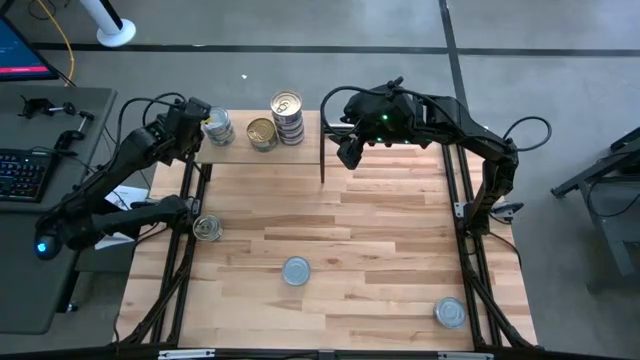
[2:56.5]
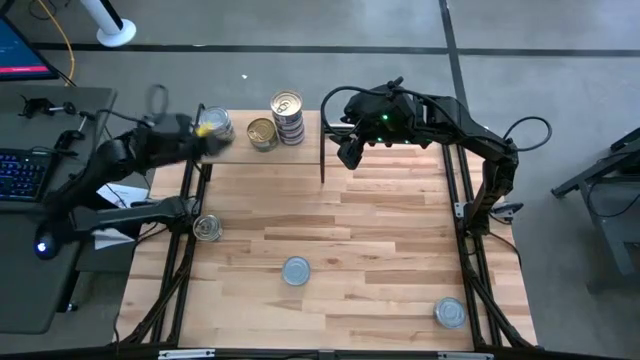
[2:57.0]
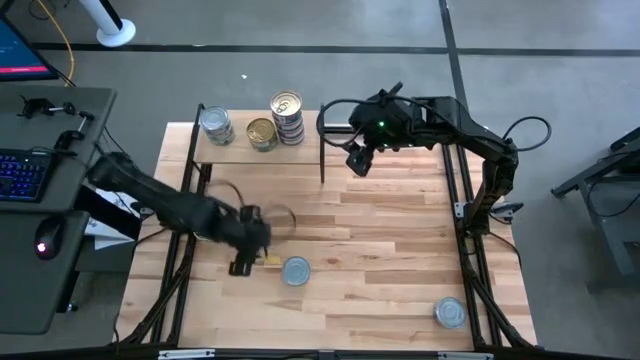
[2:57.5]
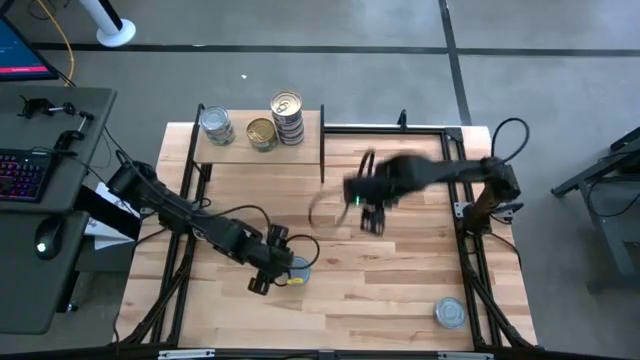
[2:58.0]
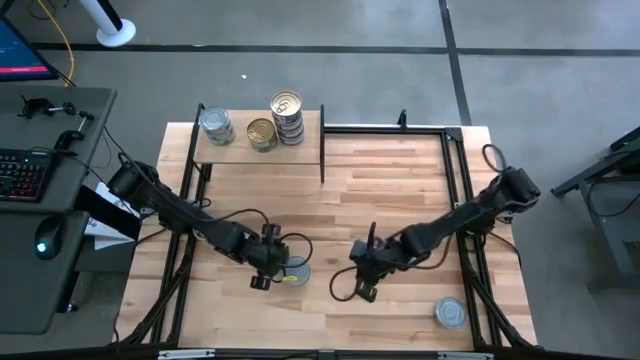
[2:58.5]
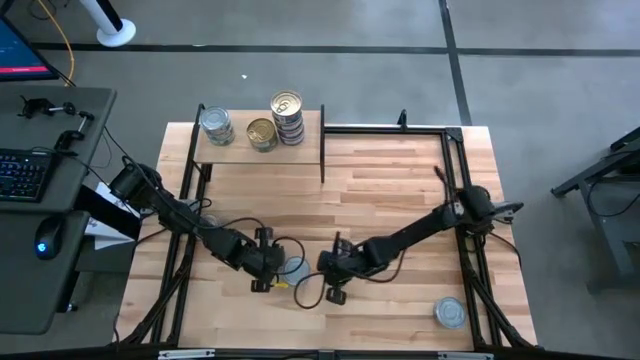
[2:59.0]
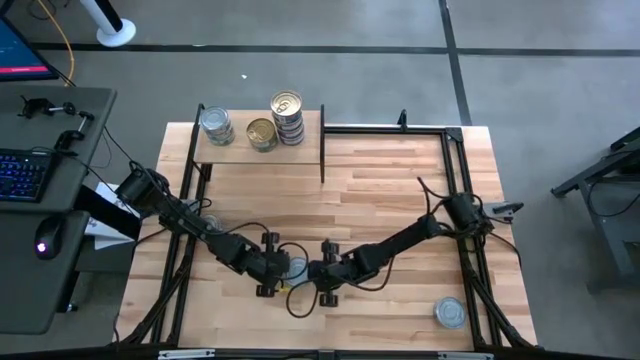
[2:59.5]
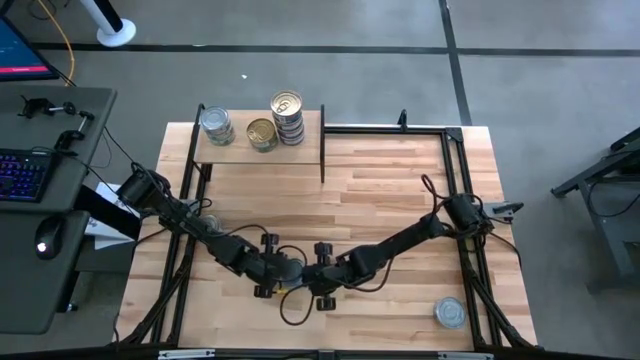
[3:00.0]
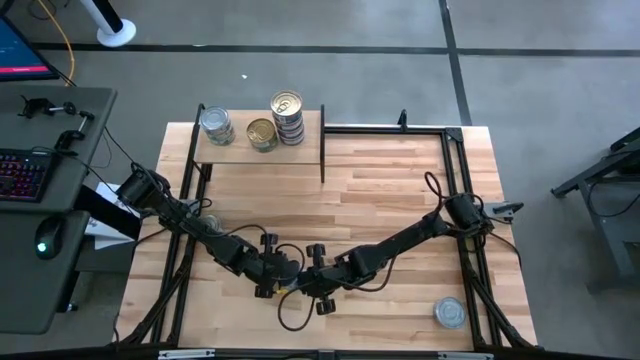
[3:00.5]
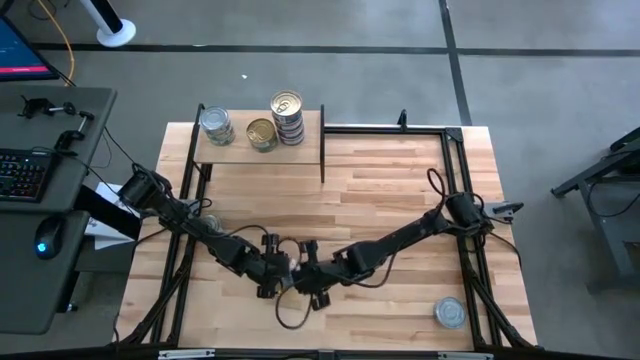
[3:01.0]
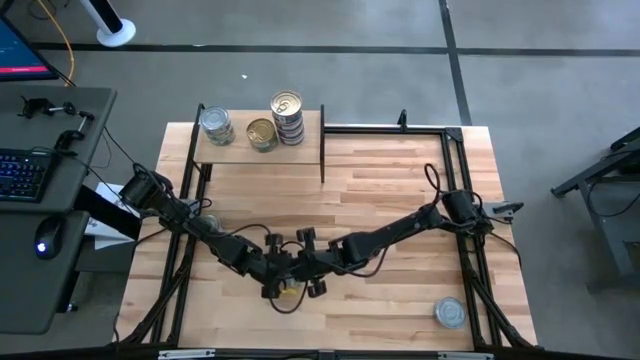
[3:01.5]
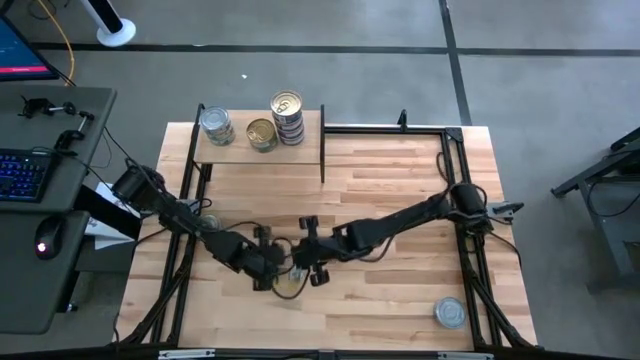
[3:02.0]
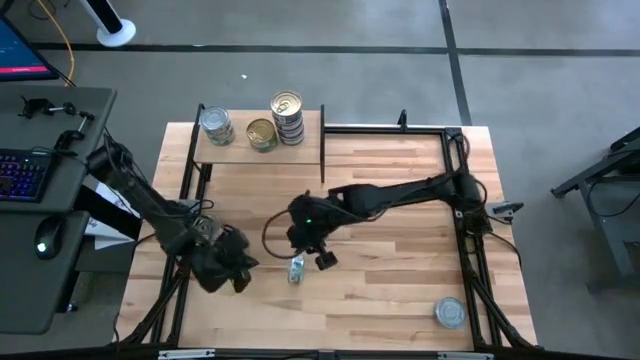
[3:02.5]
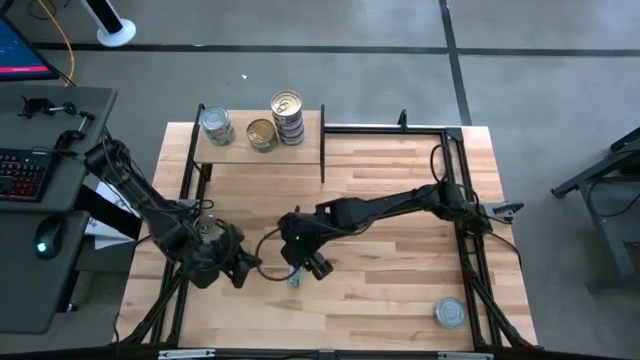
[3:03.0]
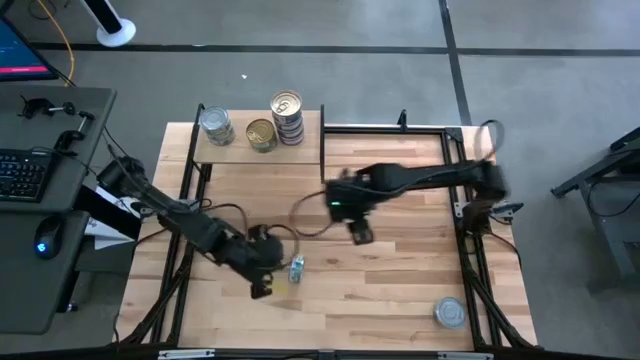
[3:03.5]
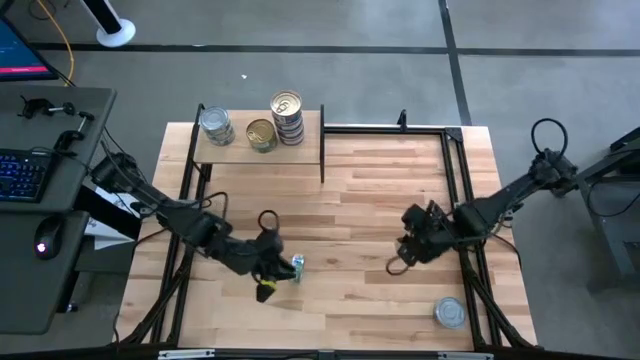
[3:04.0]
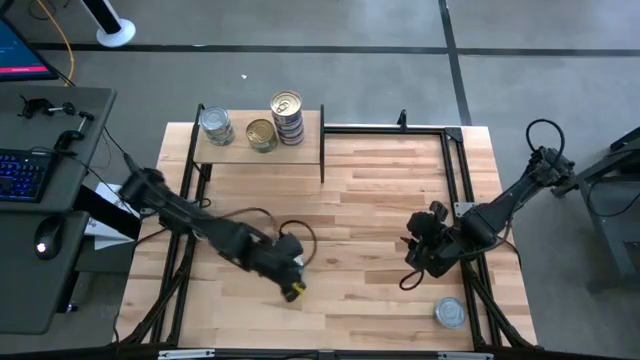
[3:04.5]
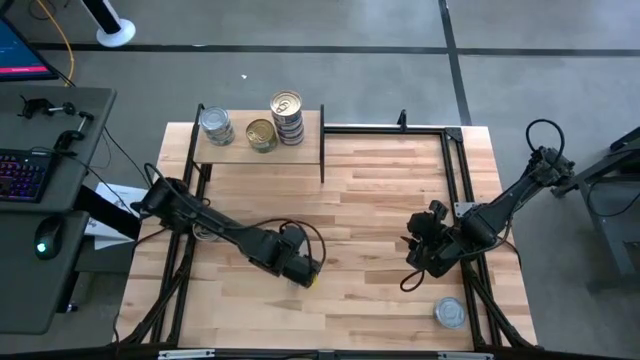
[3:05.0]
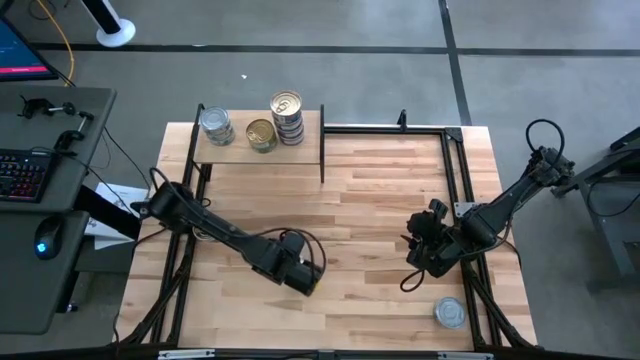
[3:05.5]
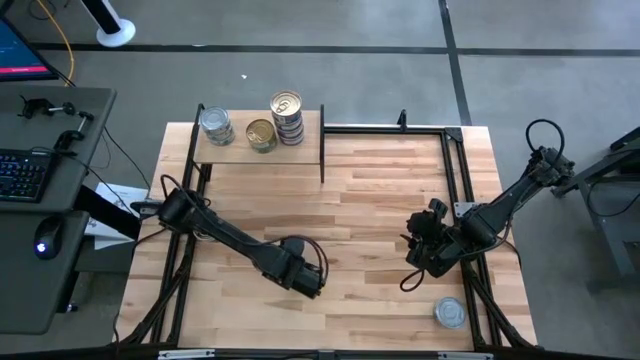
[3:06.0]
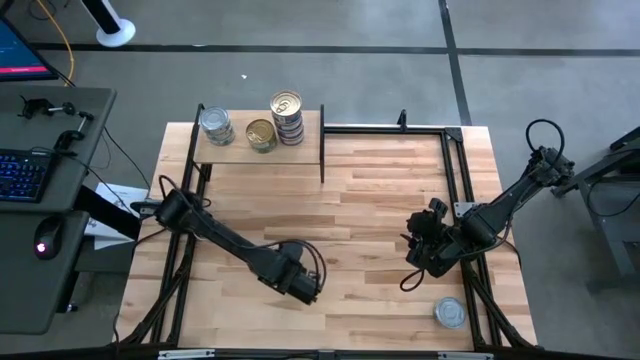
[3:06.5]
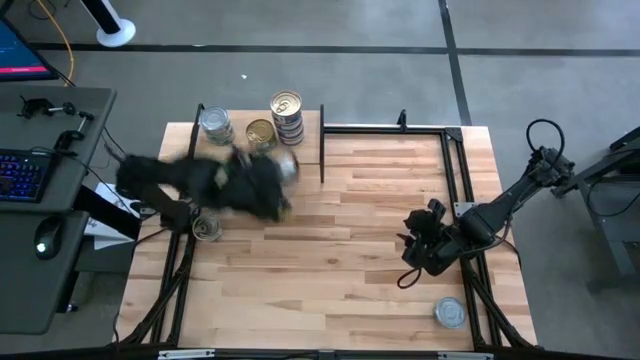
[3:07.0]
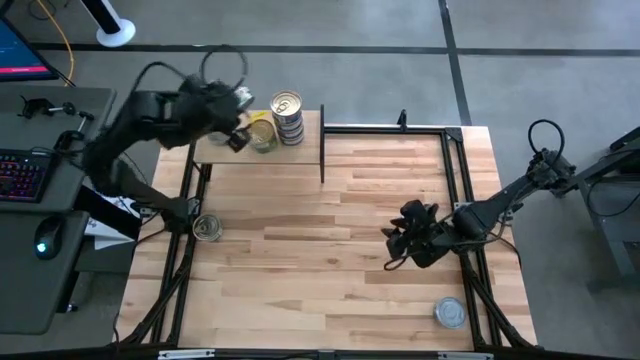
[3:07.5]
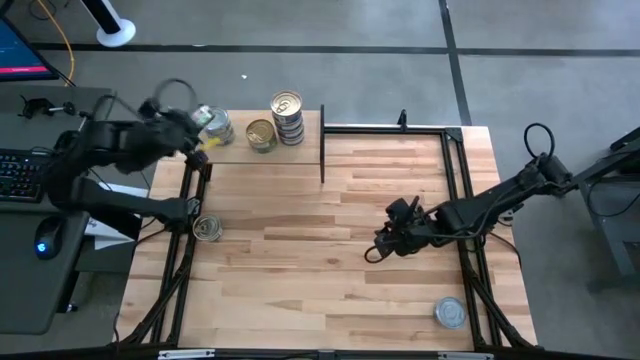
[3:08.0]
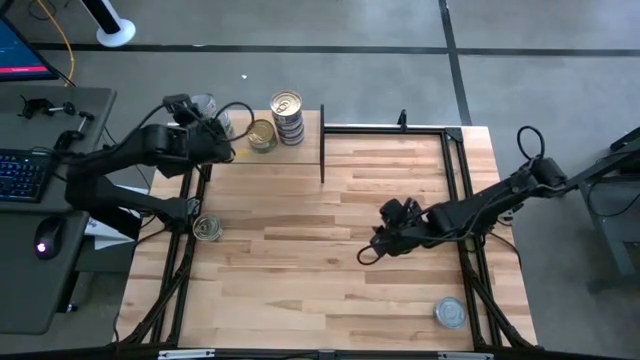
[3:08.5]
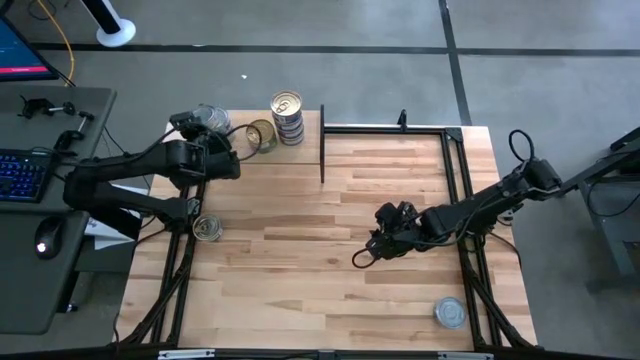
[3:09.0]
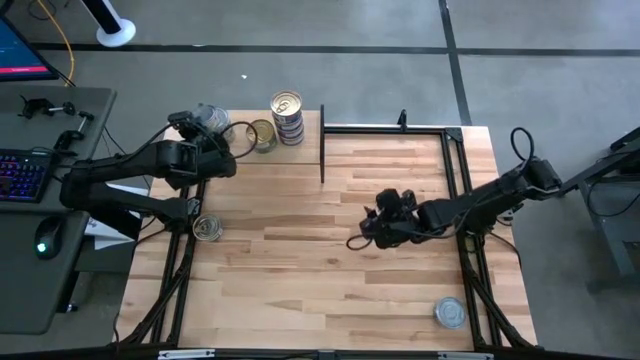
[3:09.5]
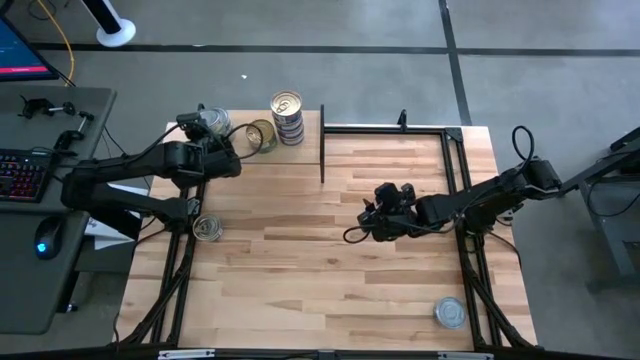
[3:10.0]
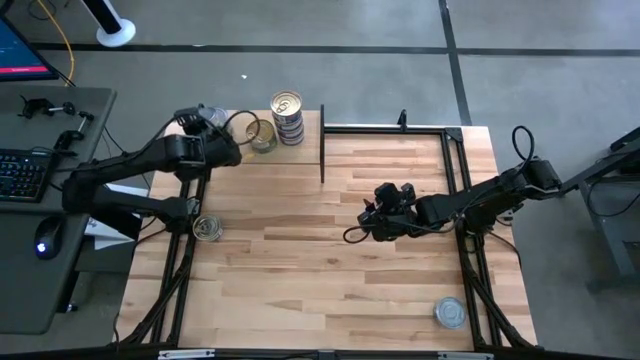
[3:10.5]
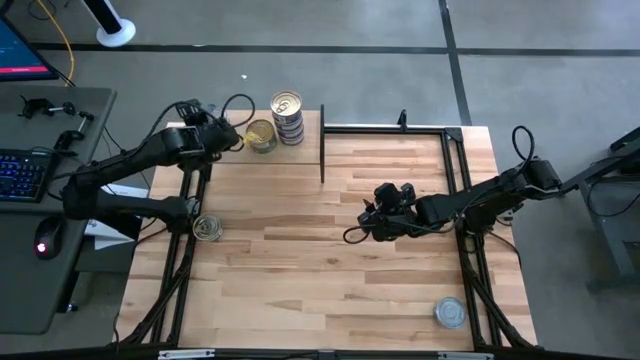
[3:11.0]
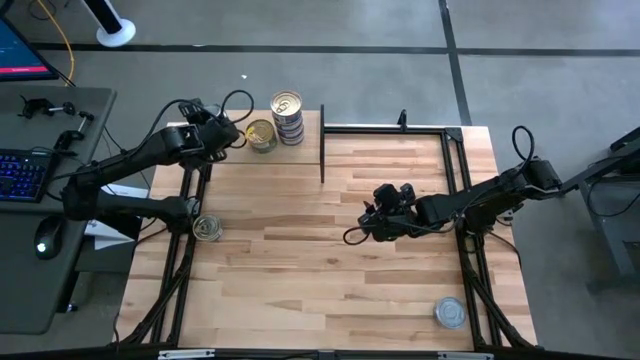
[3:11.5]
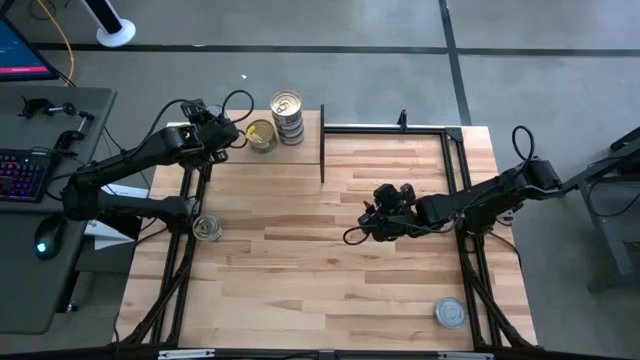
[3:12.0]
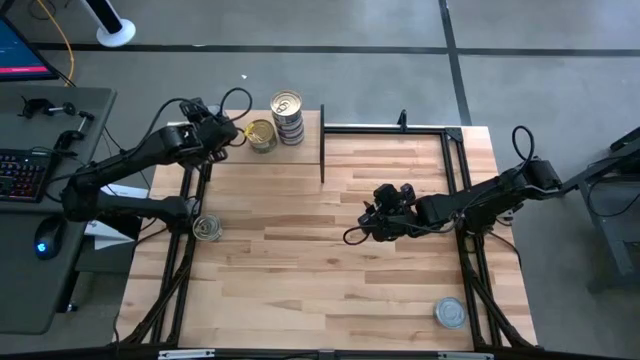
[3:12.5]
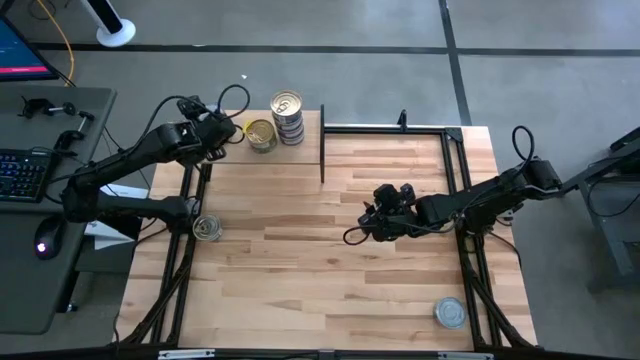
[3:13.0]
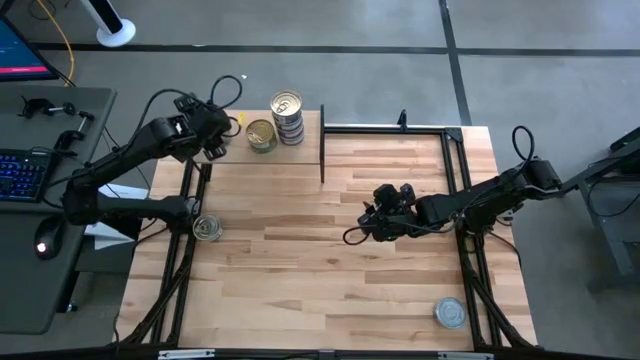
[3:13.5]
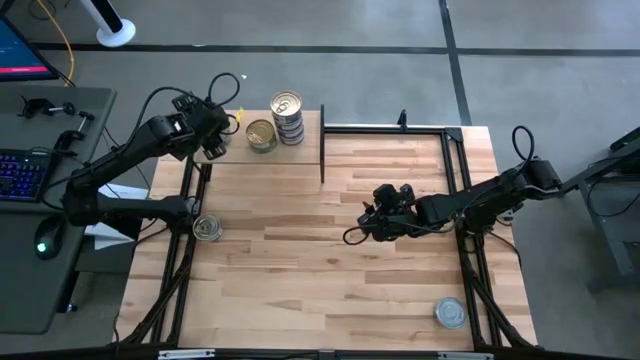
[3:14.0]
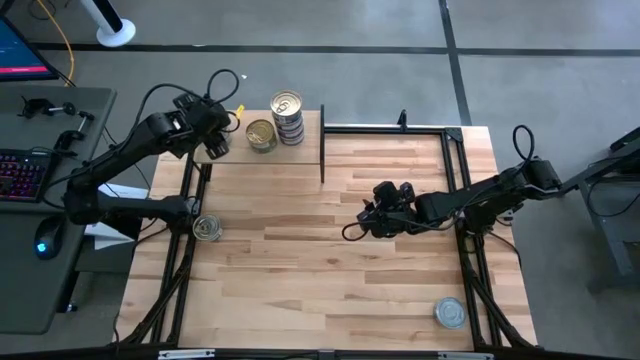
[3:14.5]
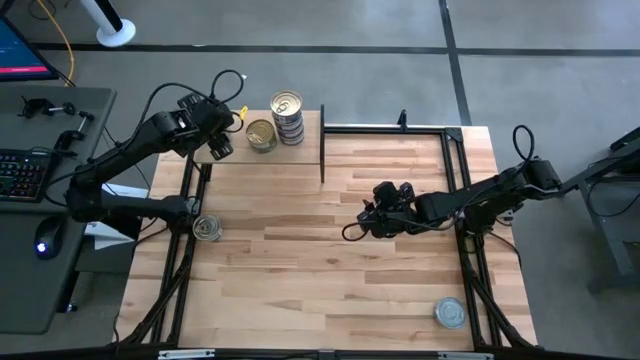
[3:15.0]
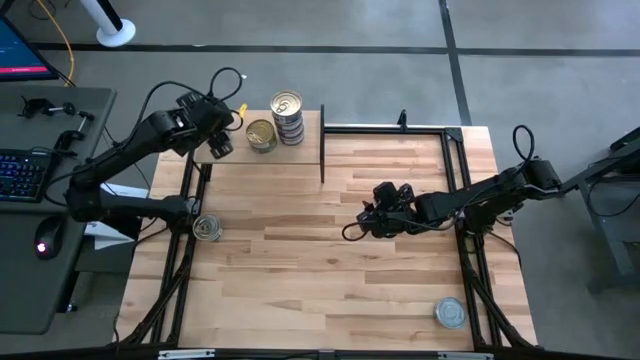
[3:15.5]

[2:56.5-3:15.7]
Task: Stack canned seafood by type on shelf
Stack the green-white tuna can on top of the green-white tuna cans on the shelf

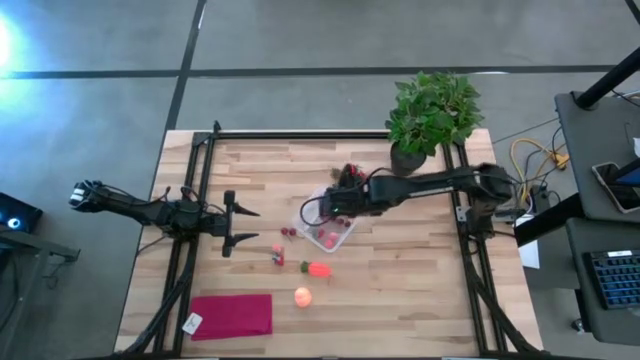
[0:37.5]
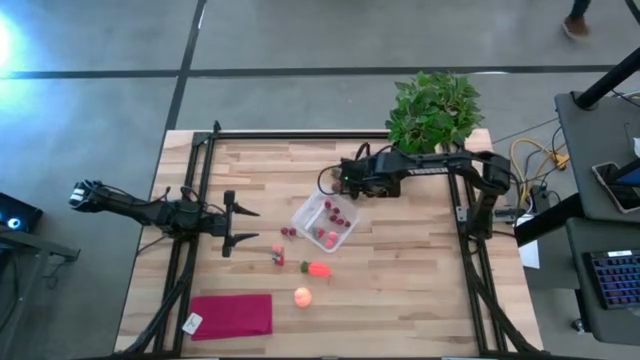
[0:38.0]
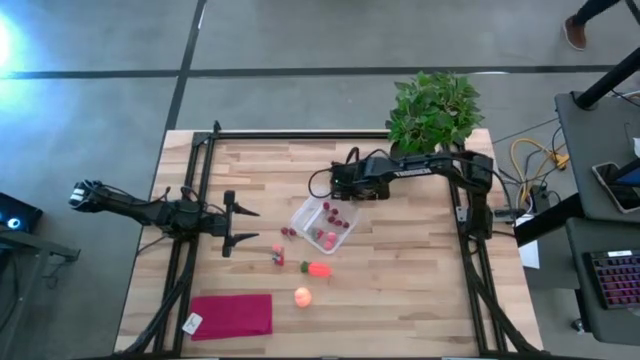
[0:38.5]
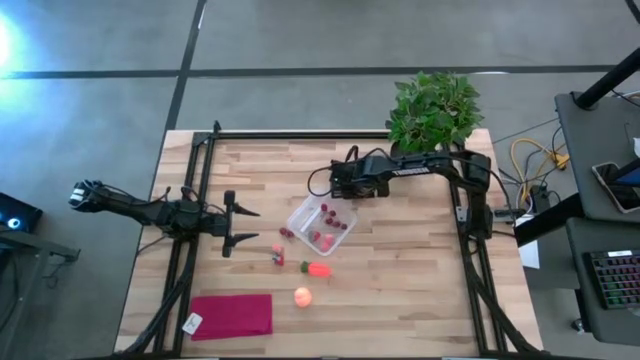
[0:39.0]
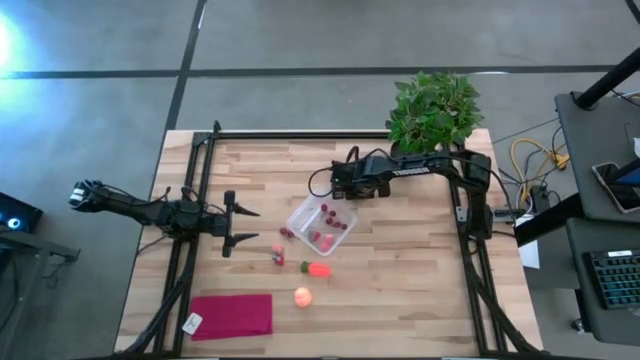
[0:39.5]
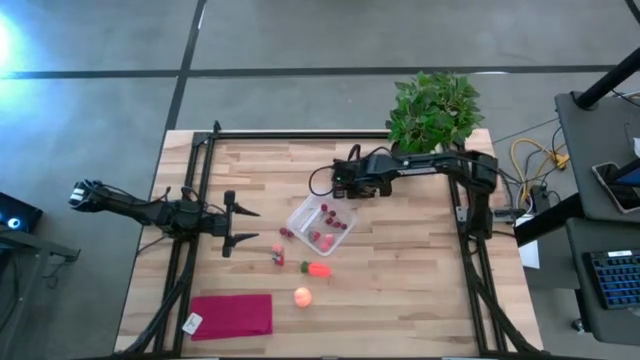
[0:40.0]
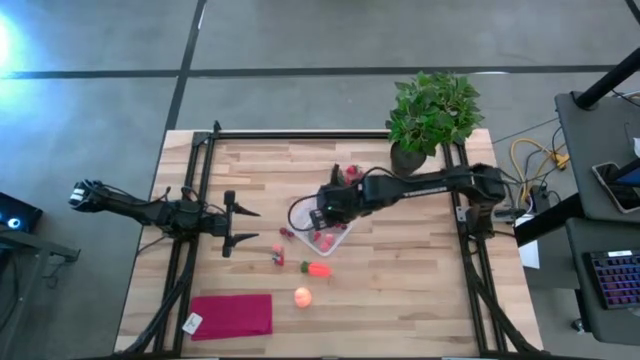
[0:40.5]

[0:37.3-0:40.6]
Task: Pick and placing Produce into tupperware
Put the blackberry into the transparent container
